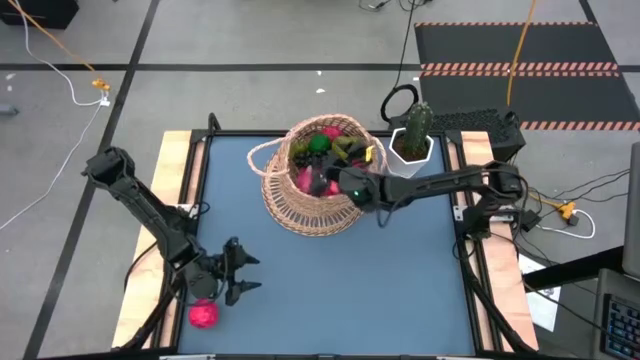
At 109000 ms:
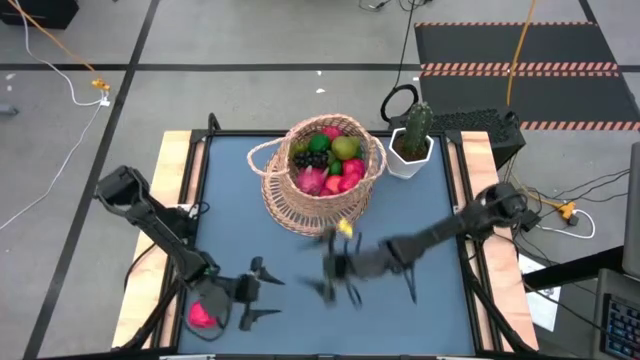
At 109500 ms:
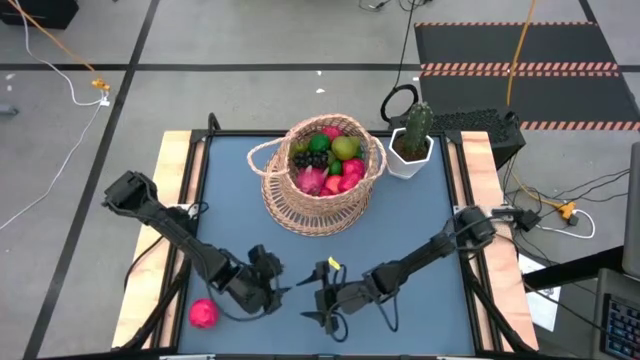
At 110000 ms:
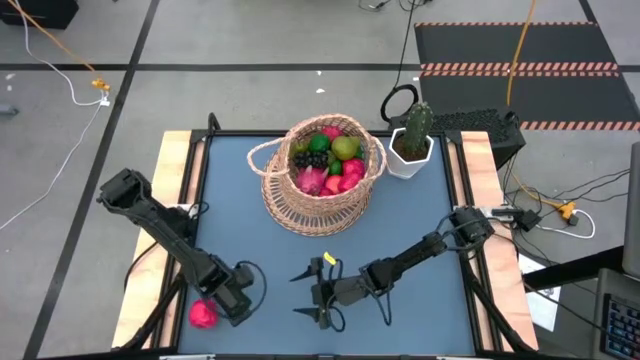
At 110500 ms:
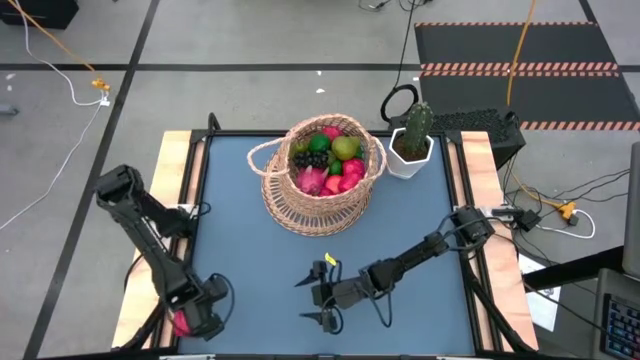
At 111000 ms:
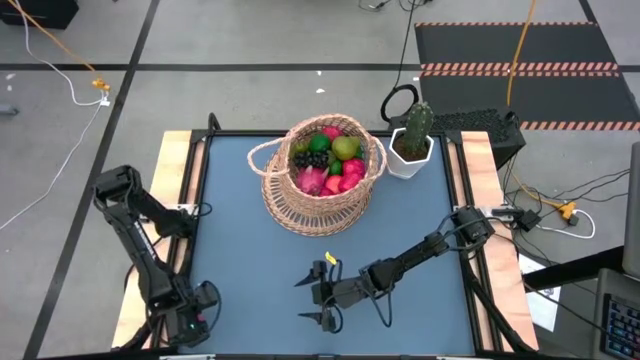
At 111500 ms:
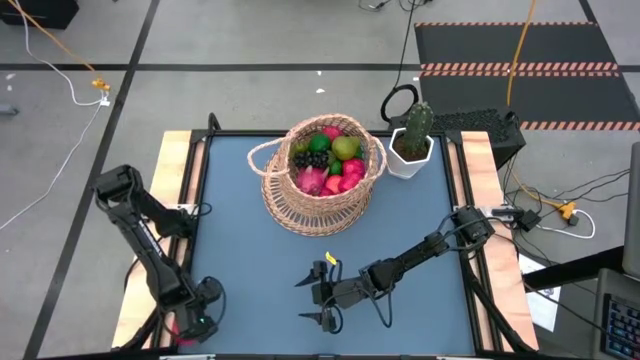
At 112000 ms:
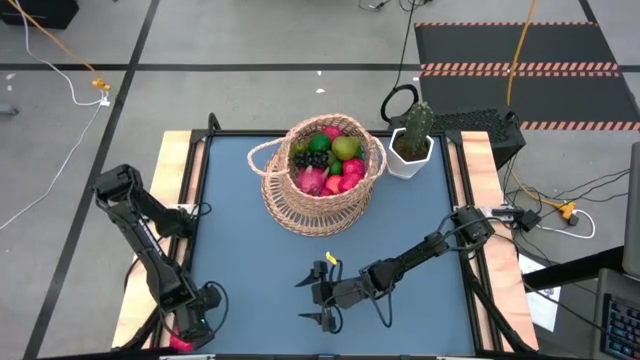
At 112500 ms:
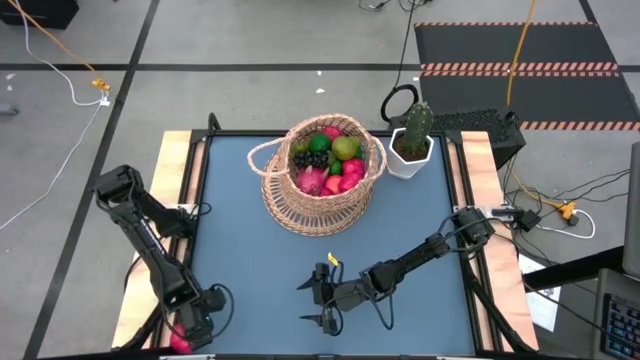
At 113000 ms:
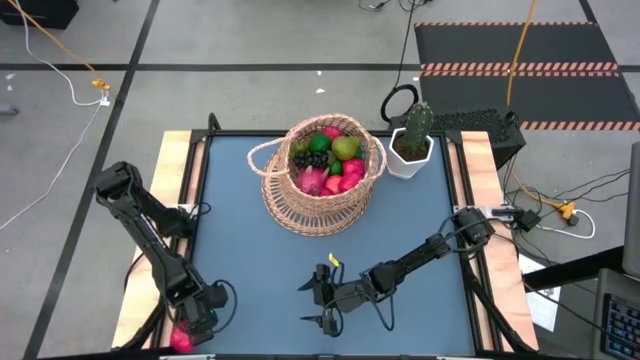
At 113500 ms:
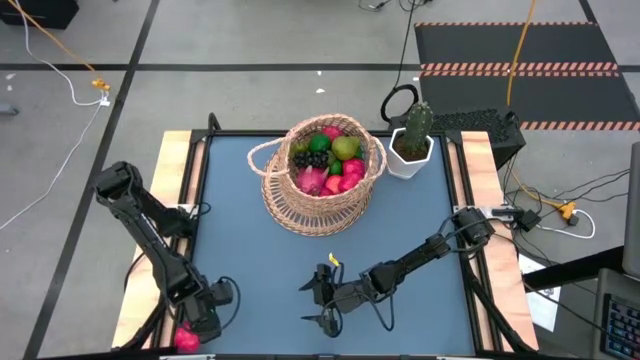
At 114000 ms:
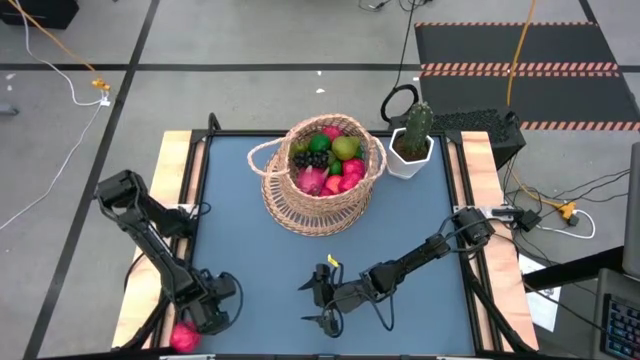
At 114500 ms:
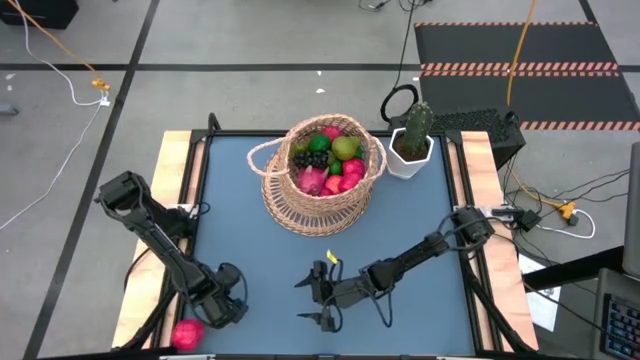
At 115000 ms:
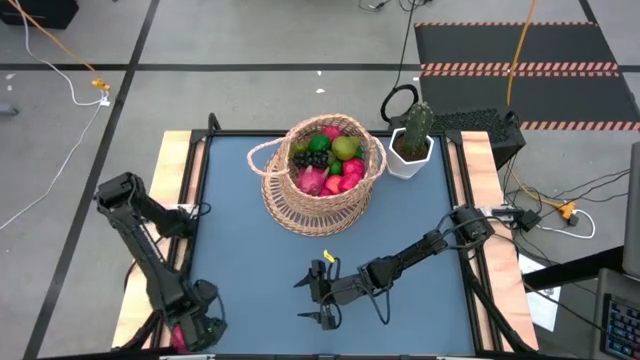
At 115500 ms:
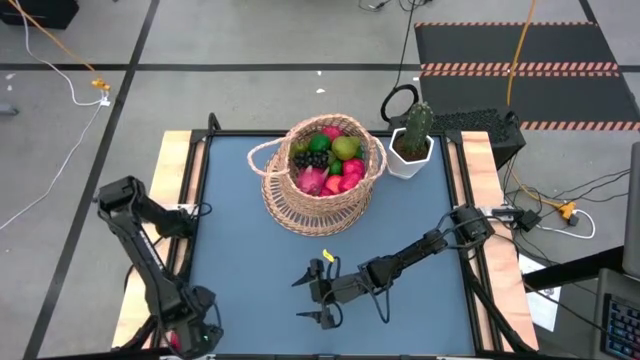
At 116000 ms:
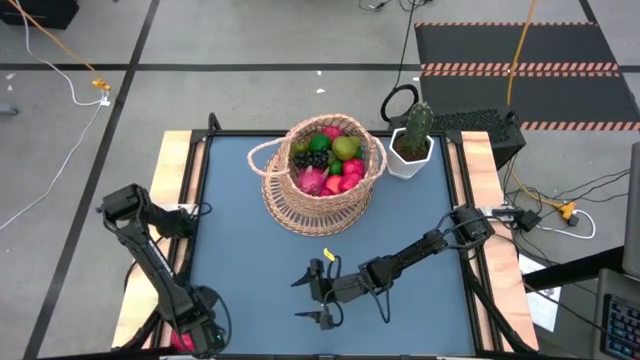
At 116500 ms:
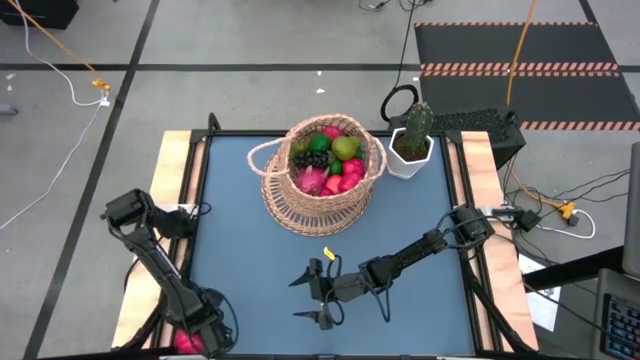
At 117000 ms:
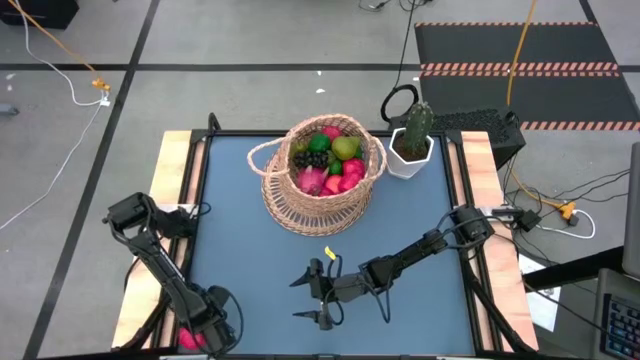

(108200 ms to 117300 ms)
Task: Build produce basket
Put the apple into the basket

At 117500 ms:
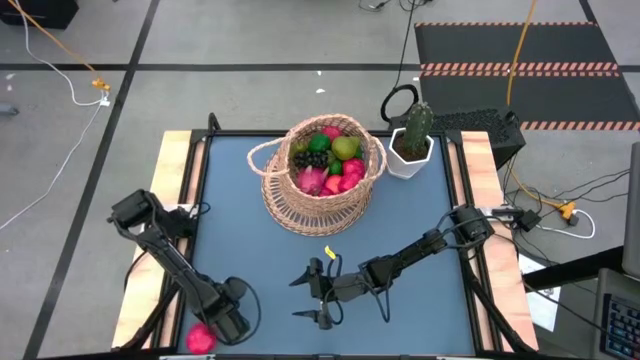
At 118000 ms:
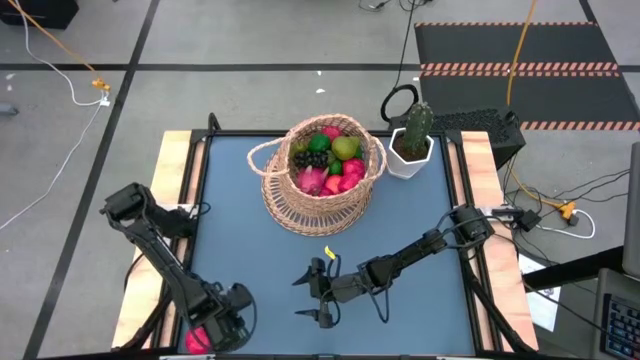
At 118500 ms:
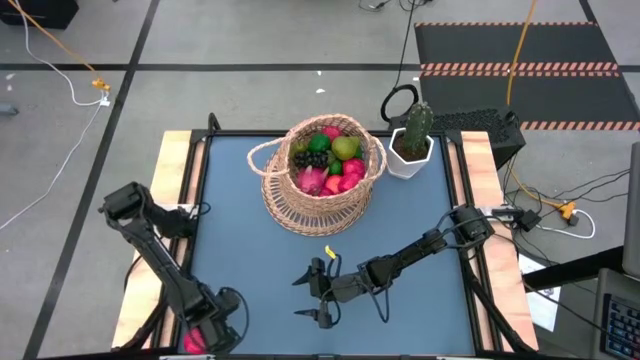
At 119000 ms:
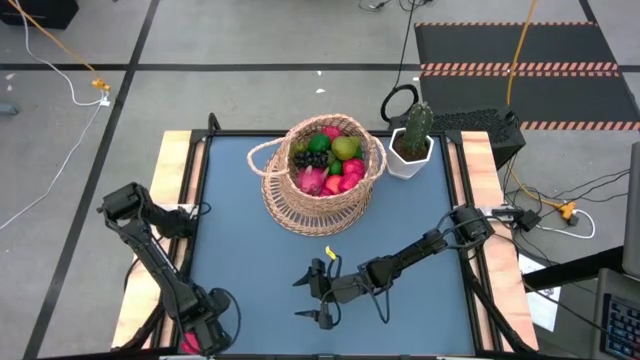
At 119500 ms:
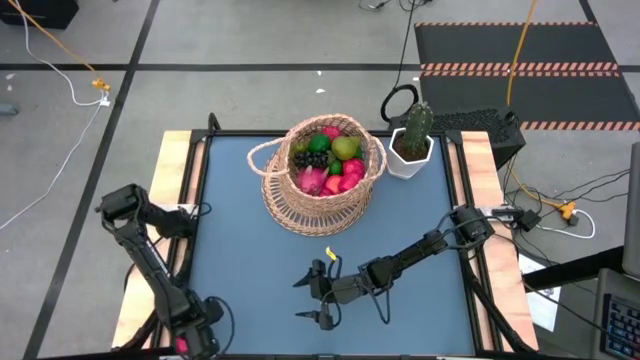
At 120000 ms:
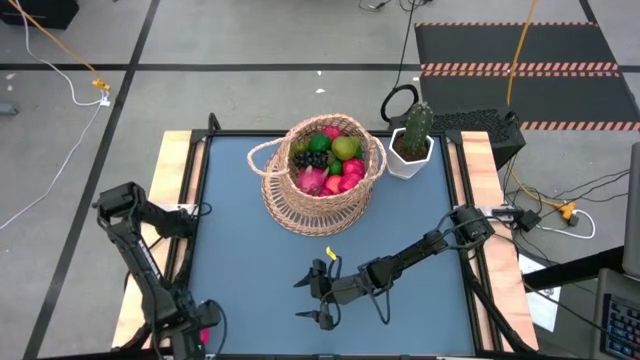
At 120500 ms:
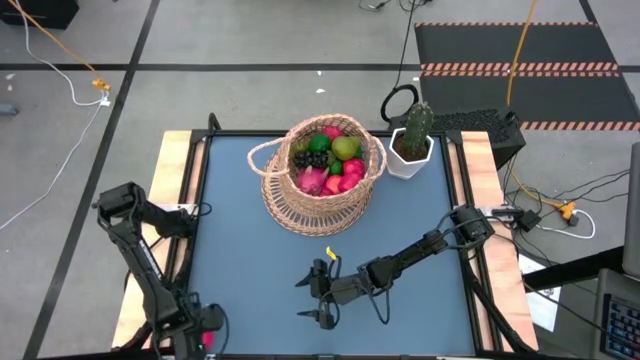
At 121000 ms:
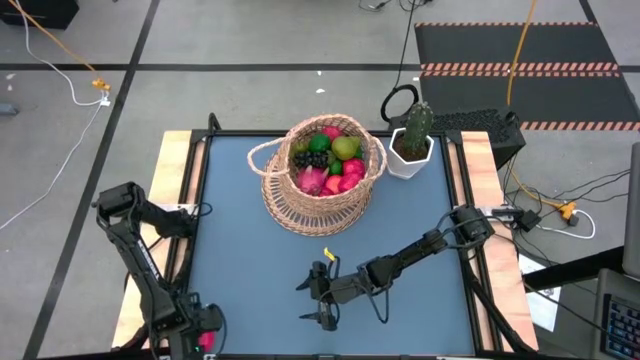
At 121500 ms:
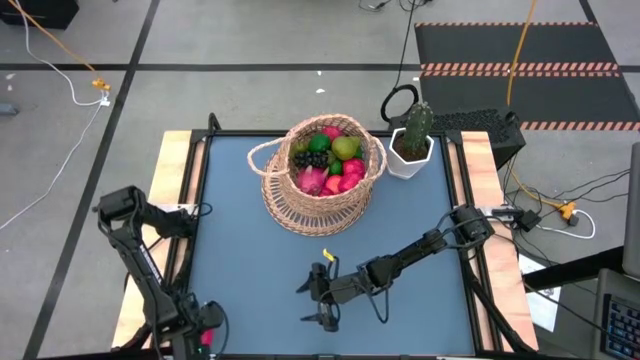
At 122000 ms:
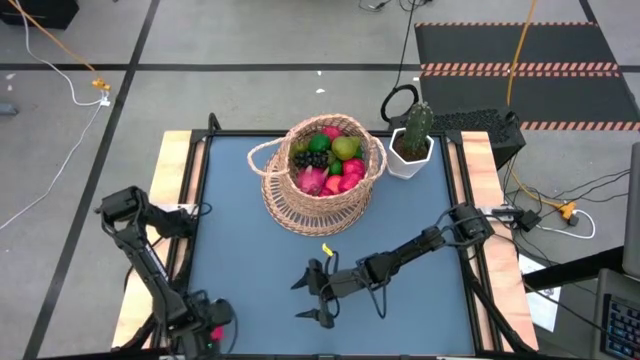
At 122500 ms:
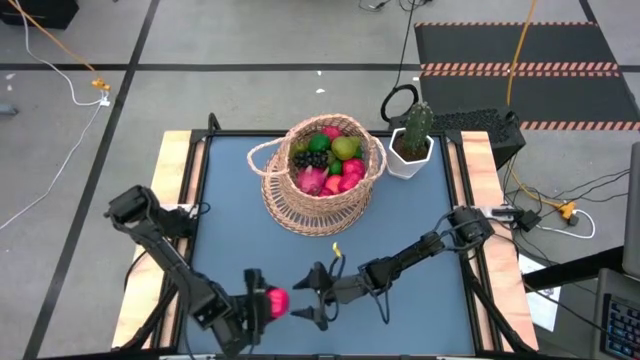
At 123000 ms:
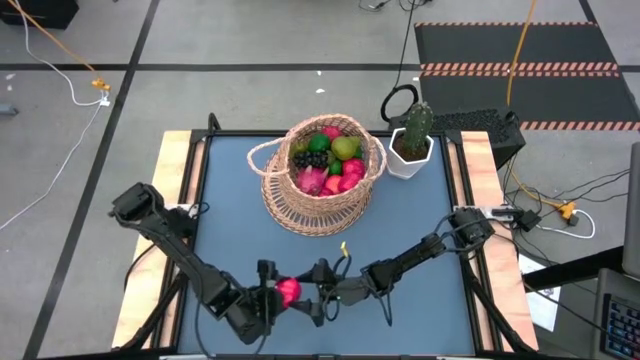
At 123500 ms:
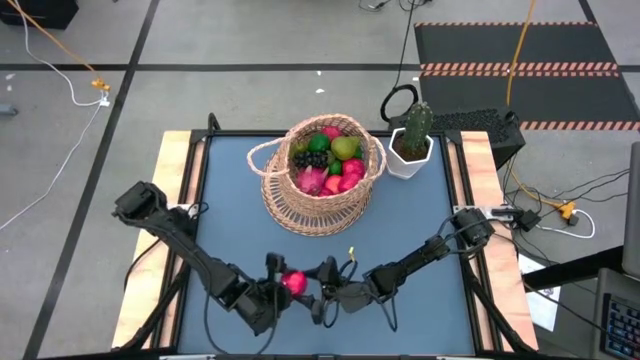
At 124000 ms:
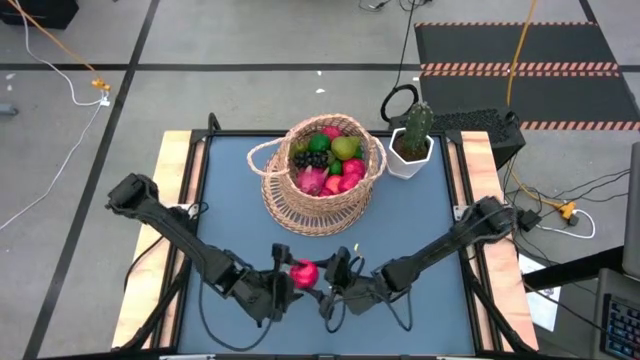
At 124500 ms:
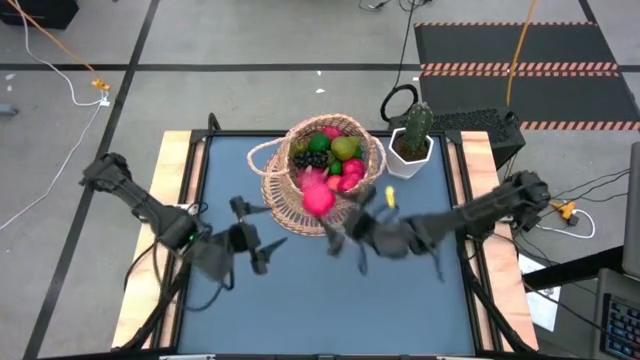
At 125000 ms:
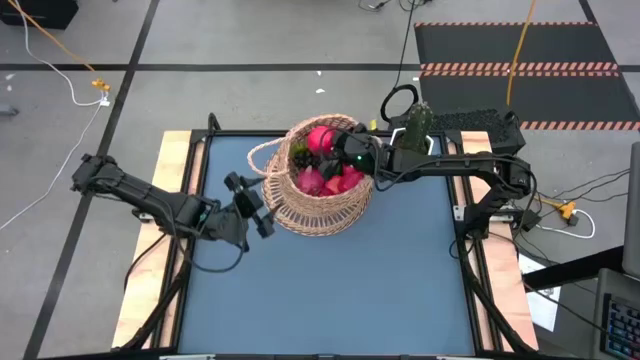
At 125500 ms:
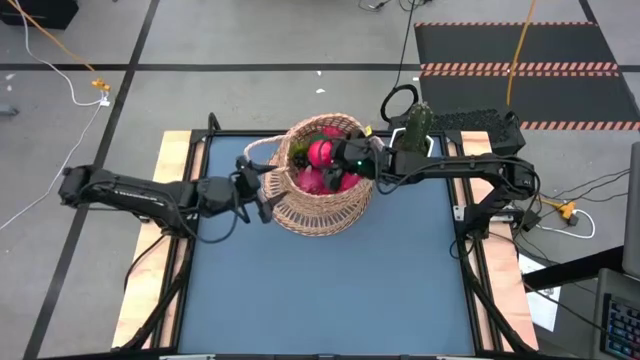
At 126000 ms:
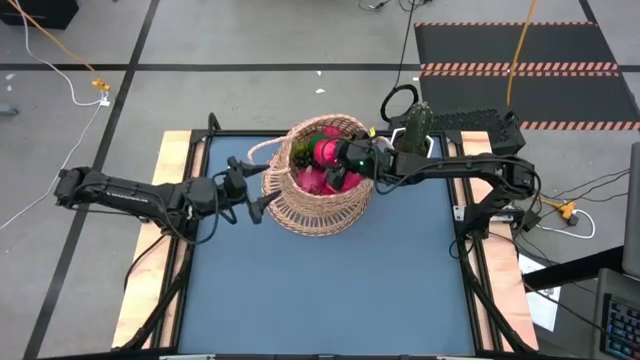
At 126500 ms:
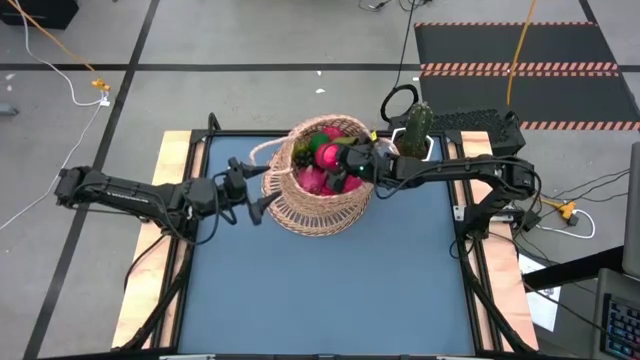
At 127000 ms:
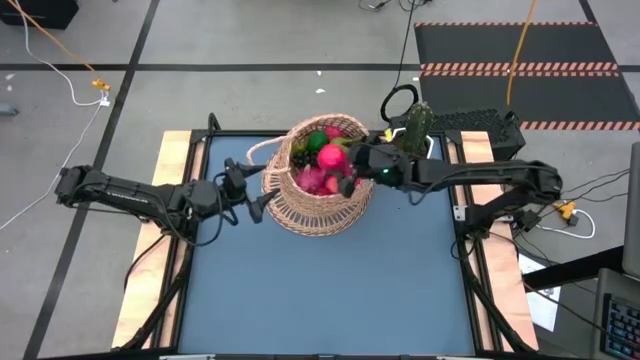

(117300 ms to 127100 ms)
Put the apple into the basket

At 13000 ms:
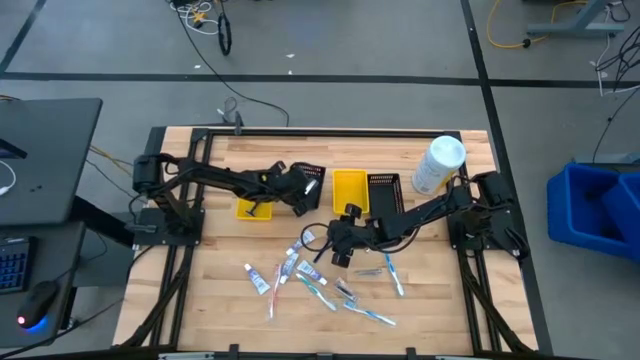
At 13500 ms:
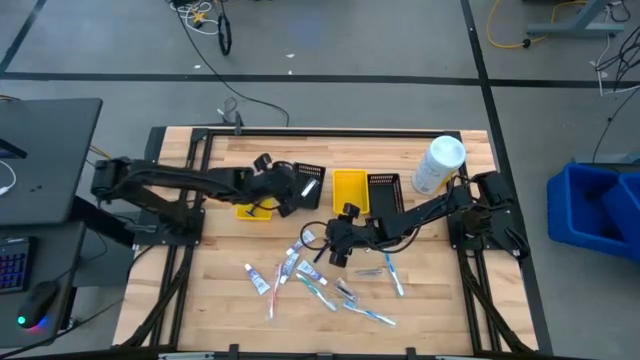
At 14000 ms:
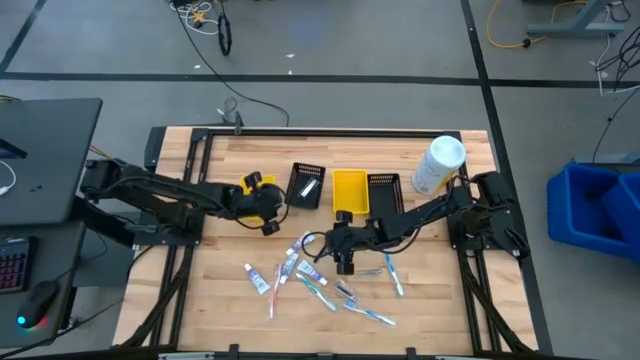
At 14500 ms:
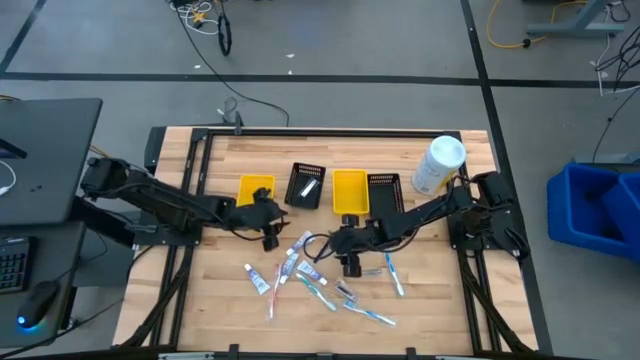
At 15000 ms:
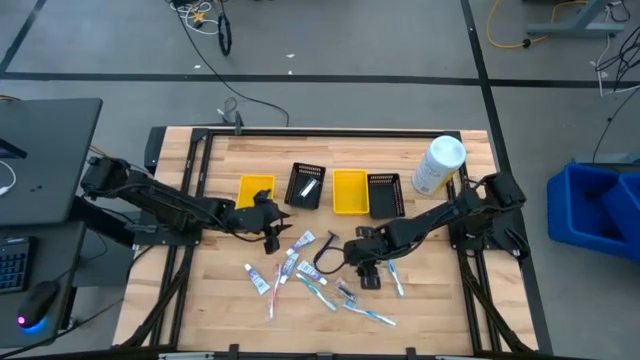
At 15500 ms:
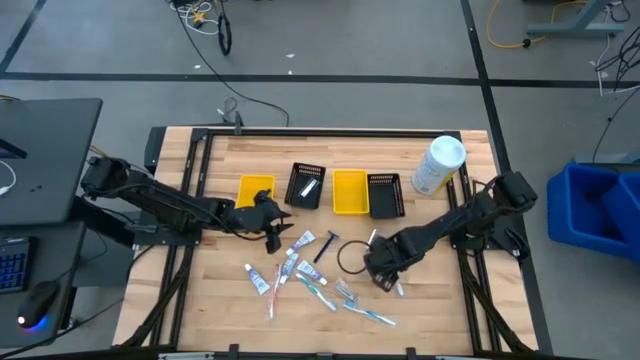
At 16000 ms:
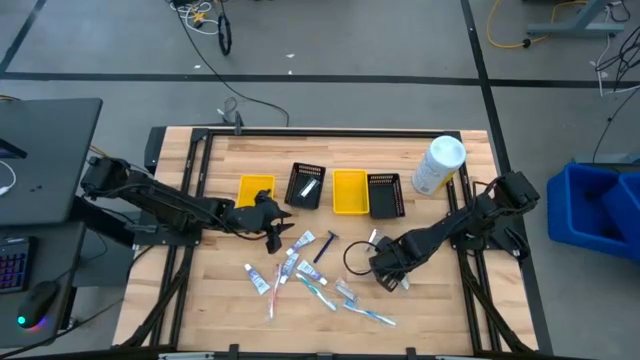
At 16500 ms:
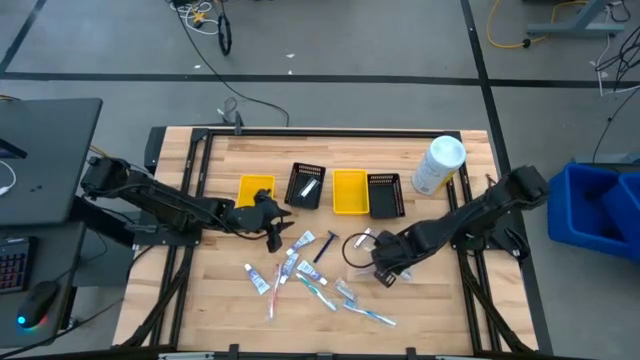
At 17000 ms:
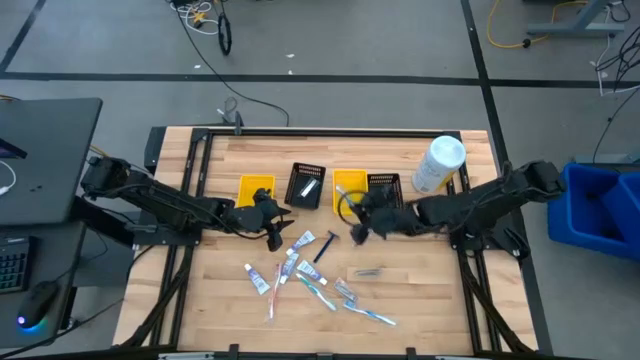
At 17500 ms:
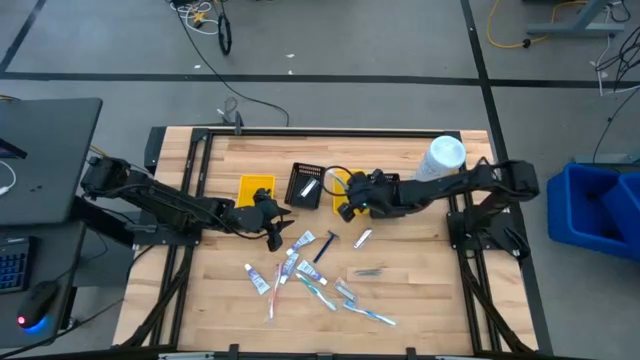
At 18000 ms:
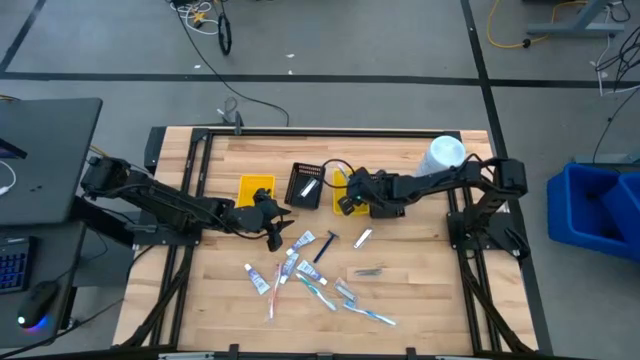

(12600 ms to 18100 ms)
Task: Pick & Place Travel size toiletries
Put the blue toothbrush into the right yellow bin
